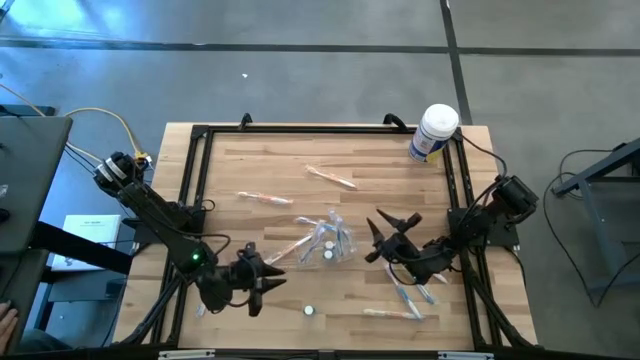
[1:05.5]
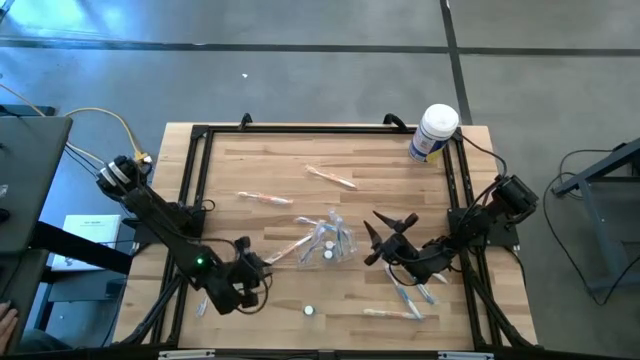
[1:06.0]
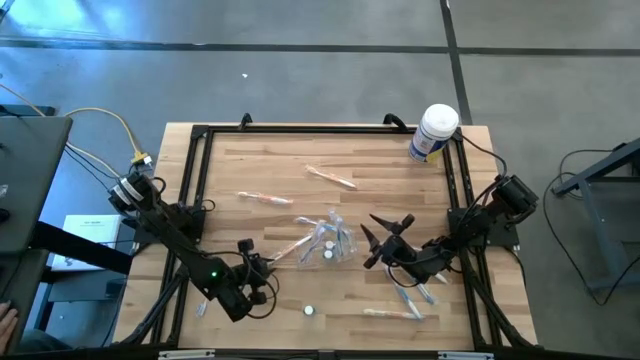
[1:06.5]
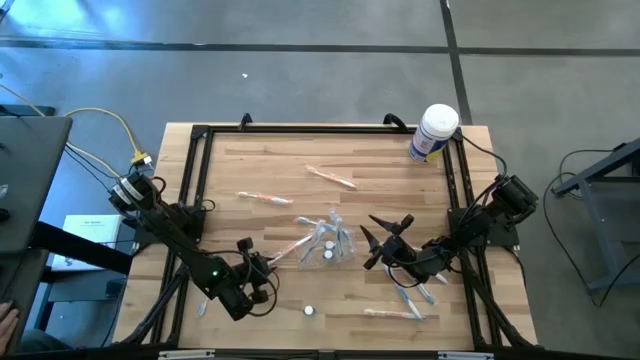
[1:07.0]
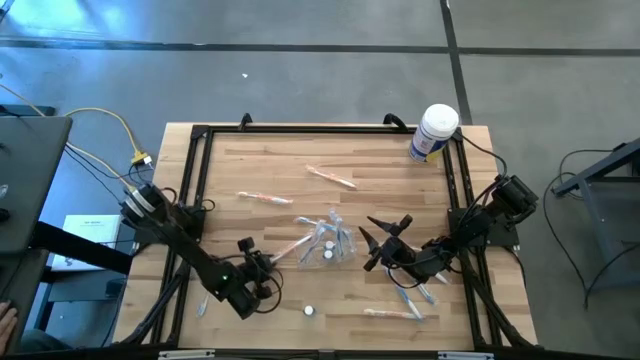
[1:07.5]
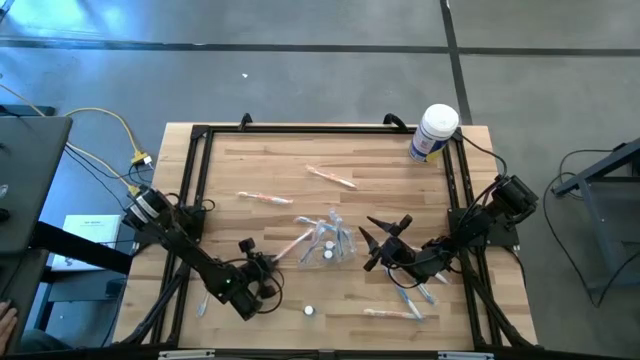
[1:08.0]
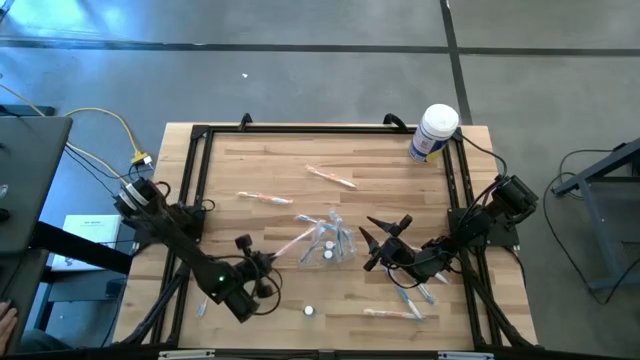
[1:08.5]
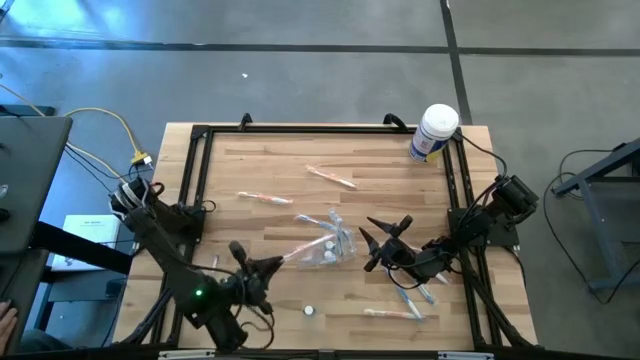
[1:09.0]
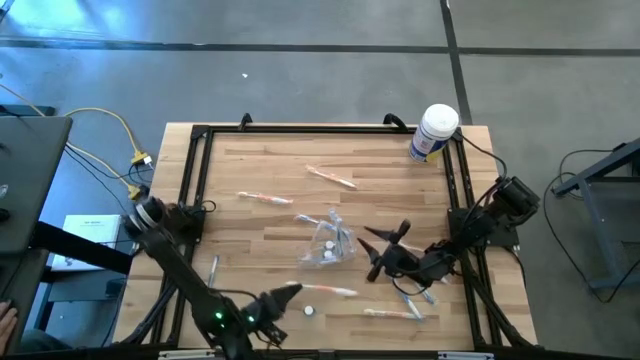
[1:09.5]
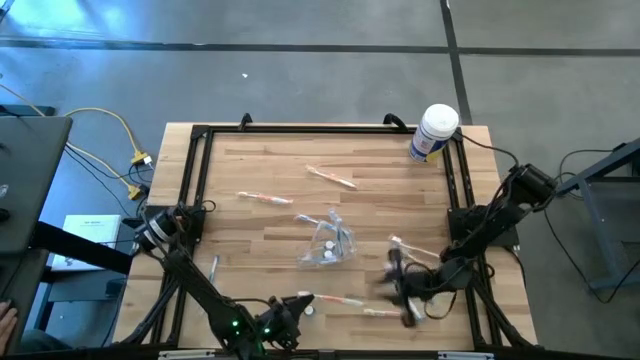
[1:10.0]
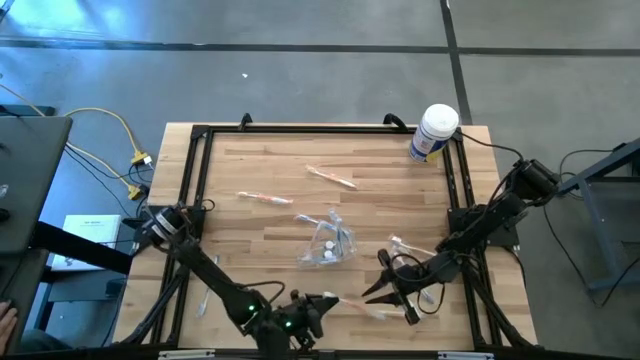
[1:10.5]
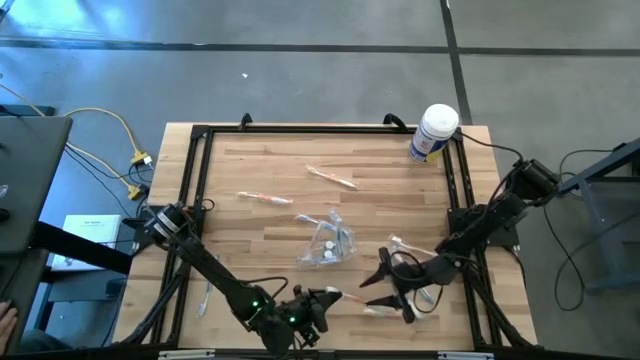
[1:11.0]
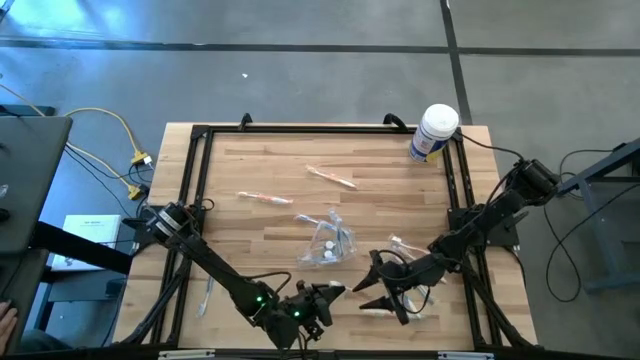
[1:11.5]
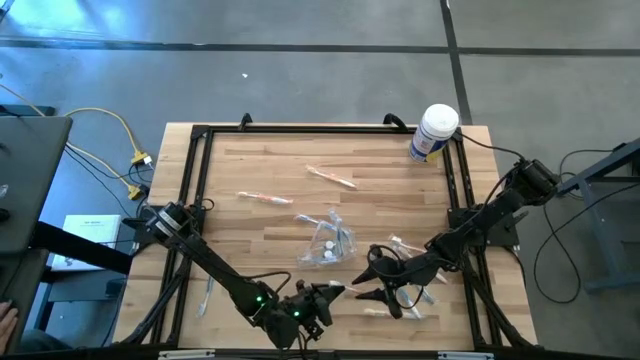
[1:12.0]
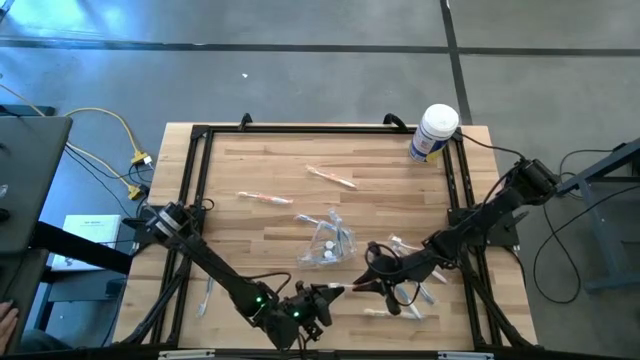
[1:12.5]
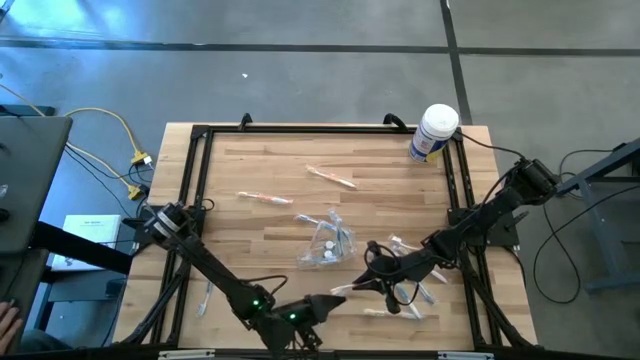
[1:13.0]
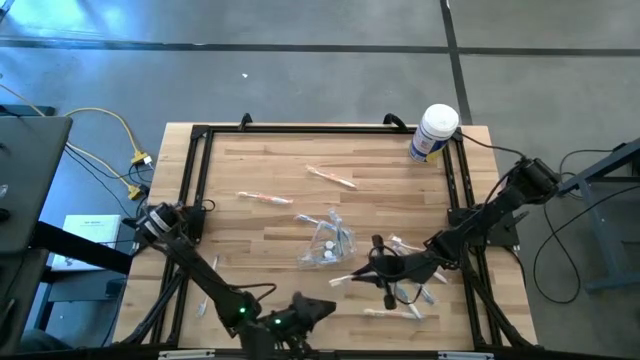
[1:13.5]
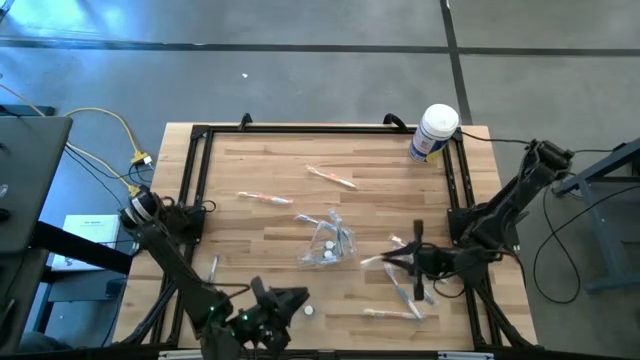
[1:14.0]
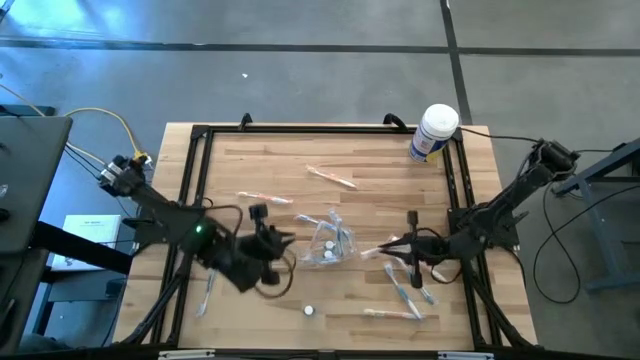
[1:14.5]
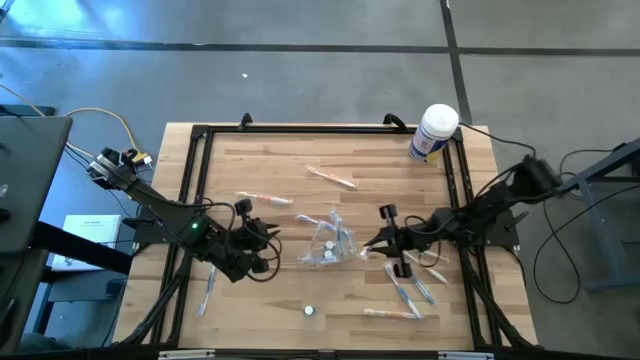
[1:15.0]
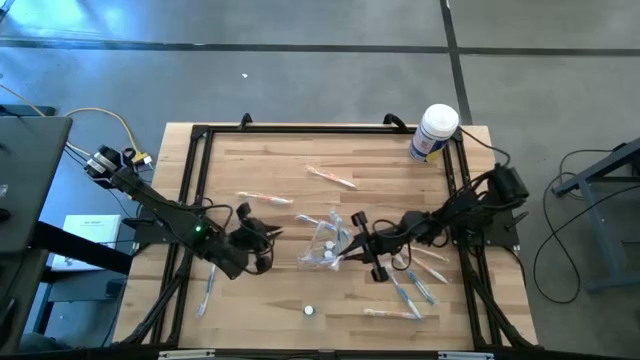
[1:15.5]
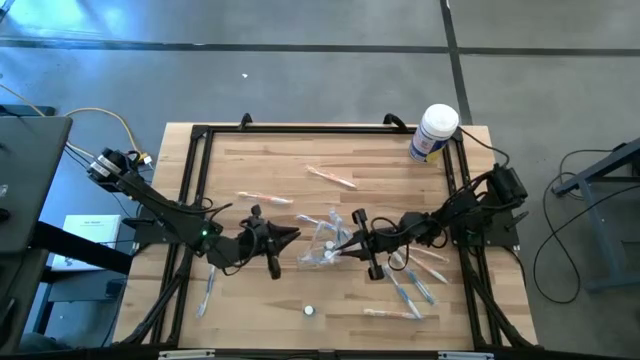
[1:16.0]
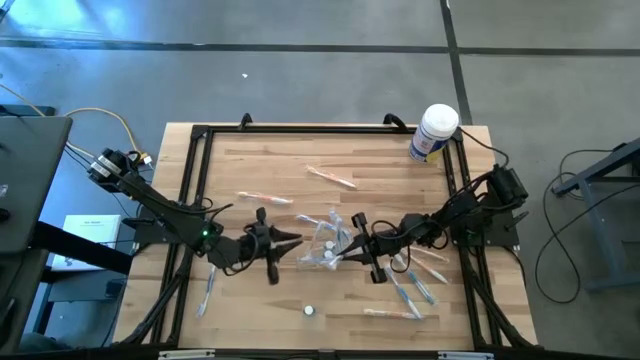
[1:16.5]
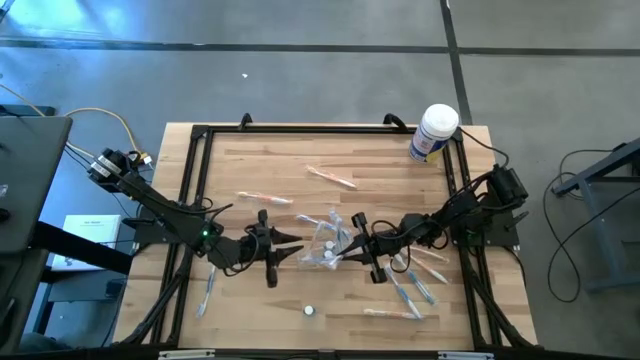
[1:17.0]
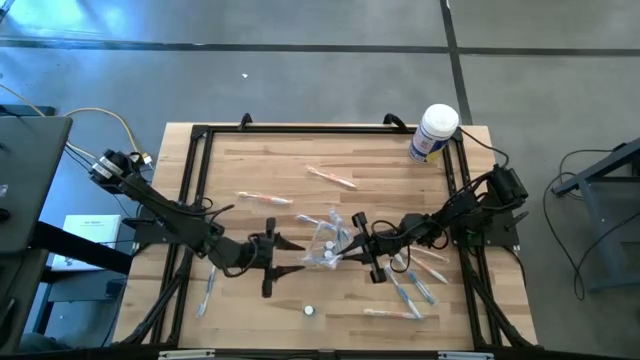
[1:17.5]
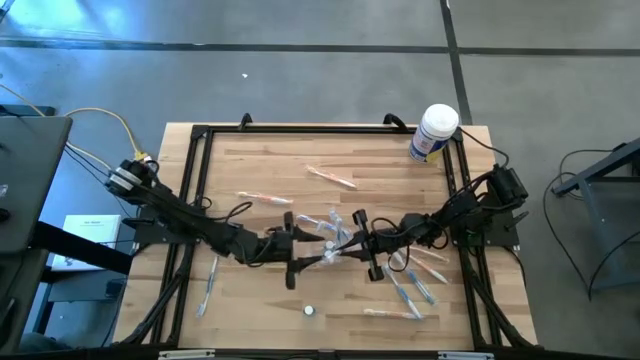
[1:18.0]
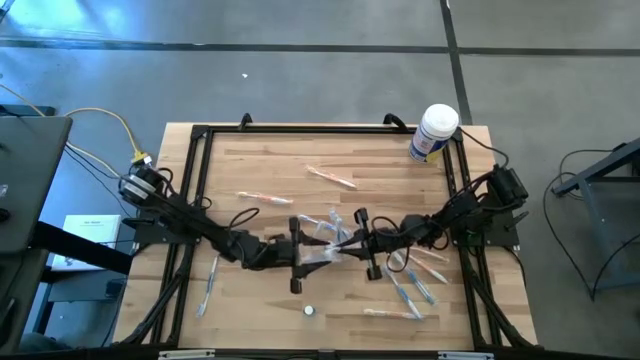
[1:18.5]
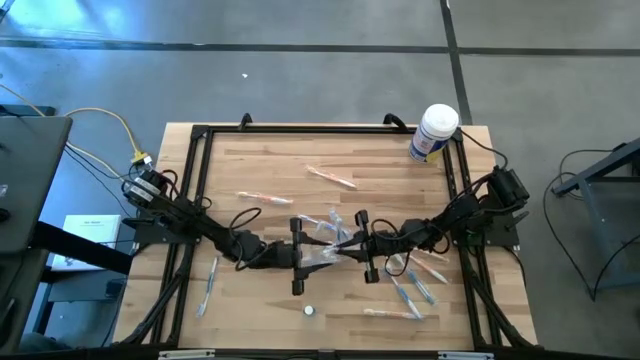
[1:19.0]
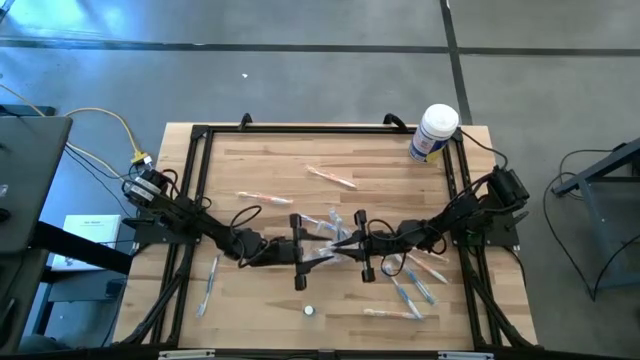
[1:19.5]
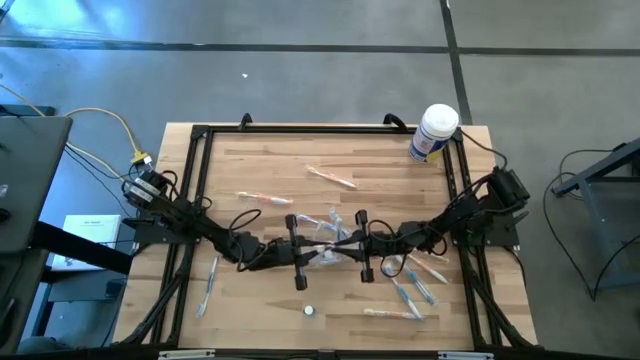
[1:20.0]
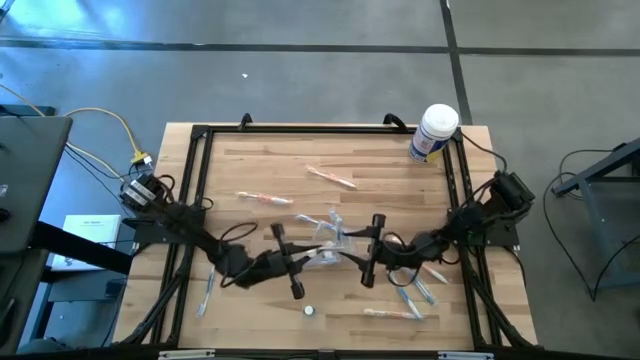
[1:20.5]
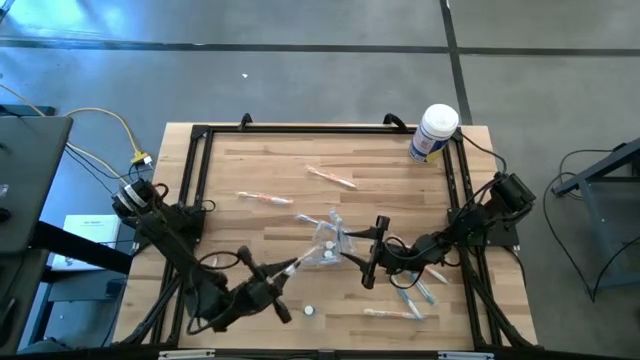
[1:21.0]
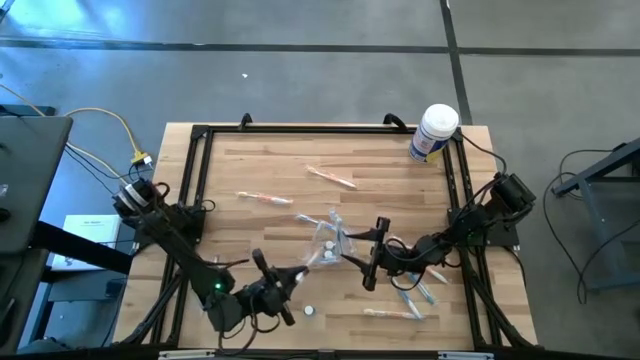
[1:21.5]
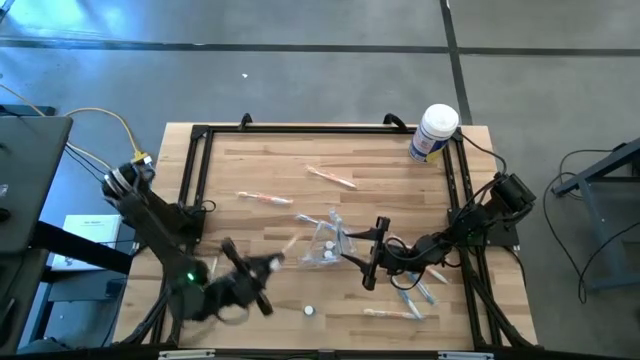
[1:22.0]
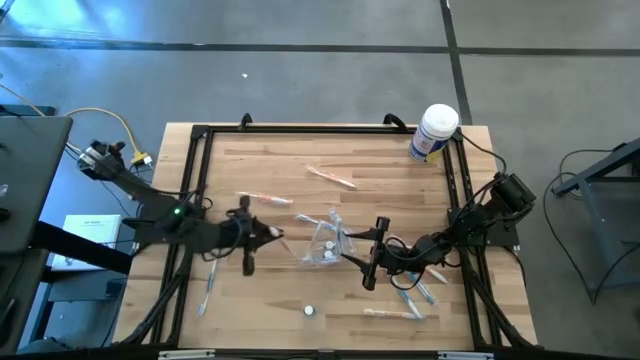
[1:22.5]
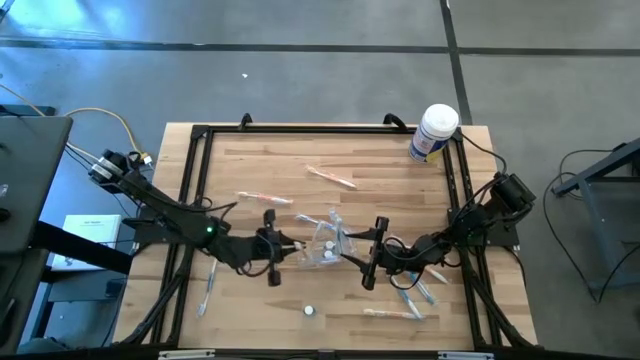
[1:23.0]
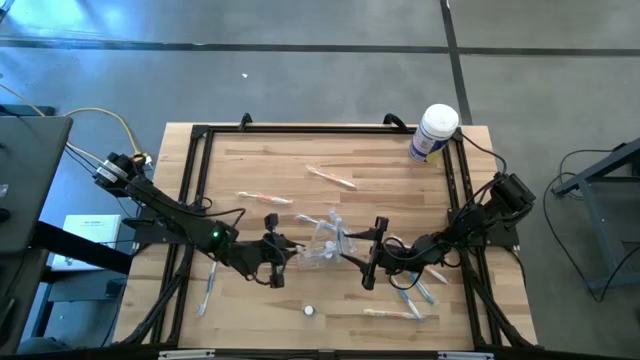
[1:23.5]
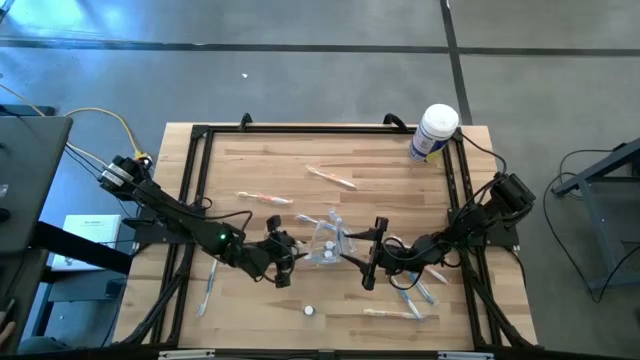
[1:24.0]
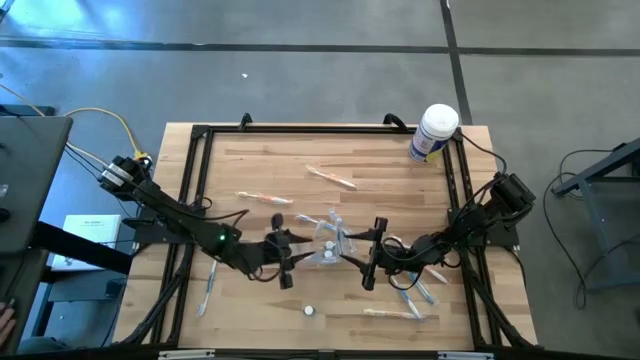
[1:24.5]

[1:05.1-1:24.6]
Task: Pick & Place toothbrushing station
Put the orange toothbrush into the transparent organizer

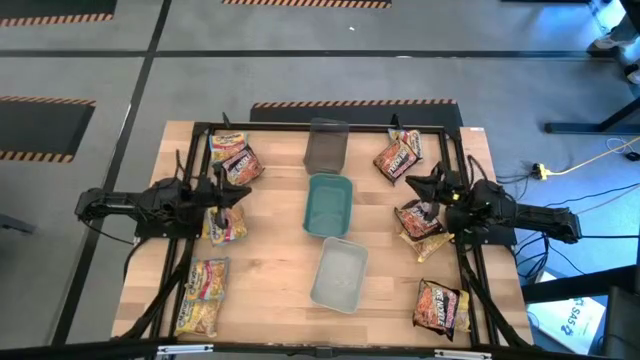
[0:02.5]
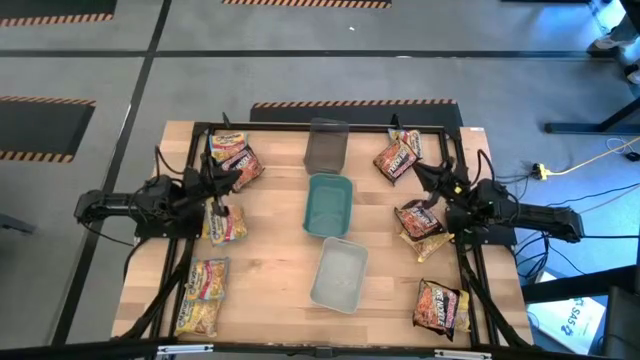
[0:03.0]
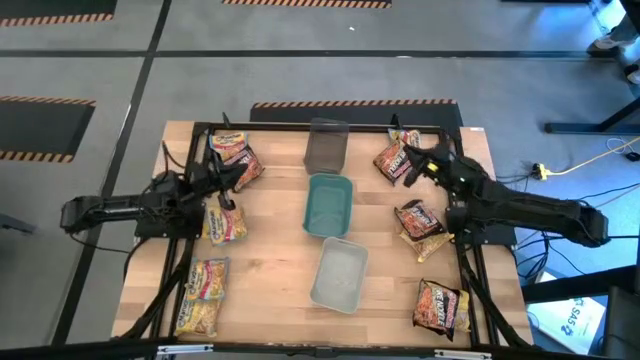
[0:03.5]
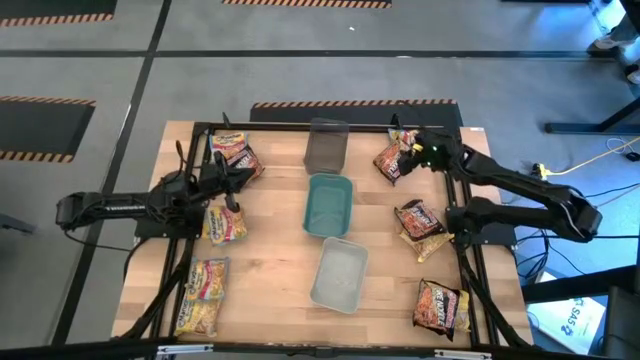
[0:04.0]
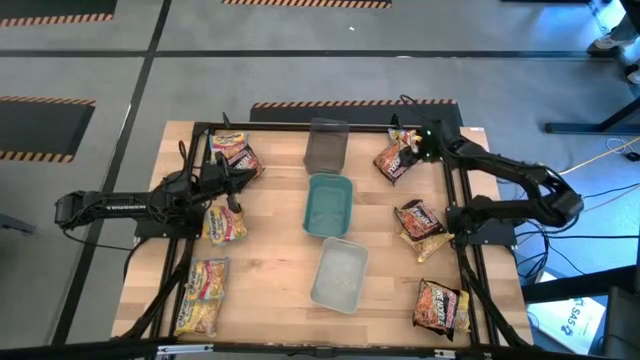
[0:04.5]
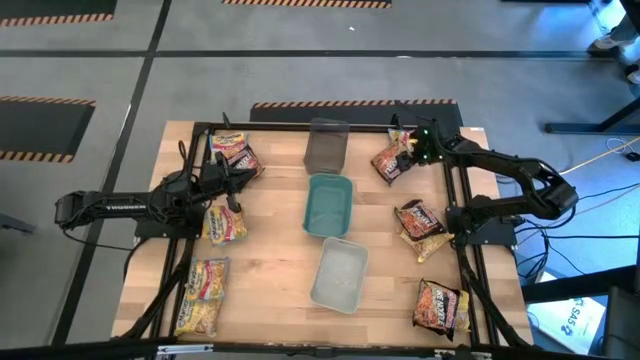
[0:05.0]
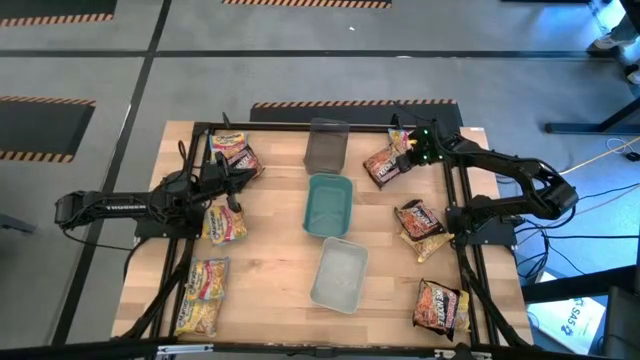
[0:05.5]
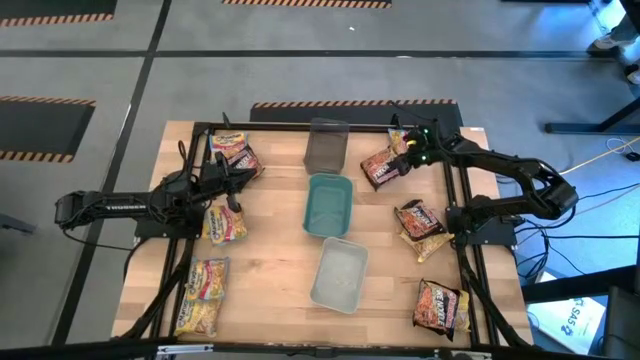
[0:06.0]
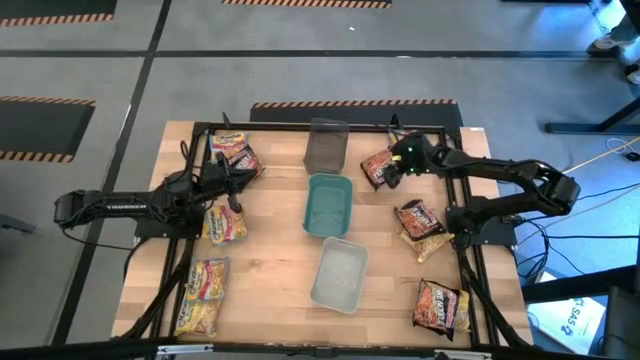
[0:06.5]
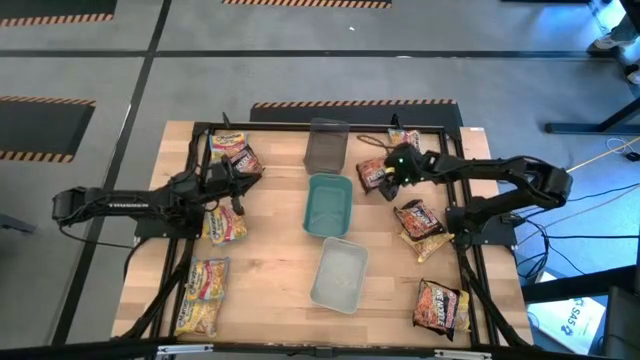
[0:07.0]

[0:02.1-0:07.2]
Task: Sort Maruchan noodles
Put the black noodle pack into the black bin
